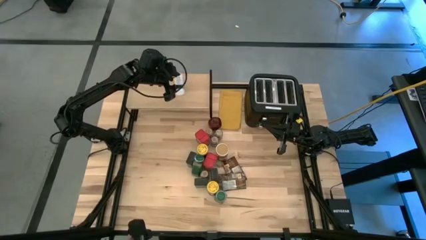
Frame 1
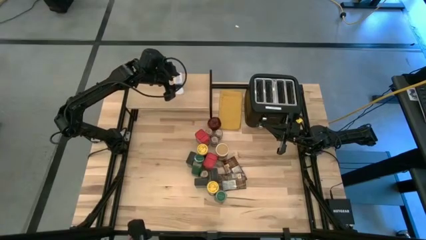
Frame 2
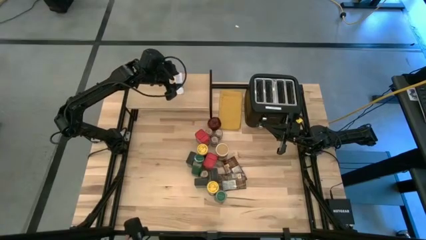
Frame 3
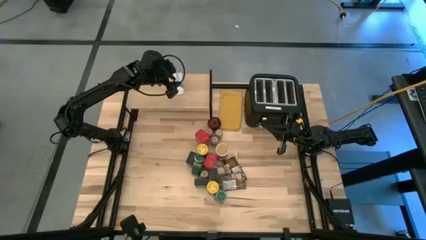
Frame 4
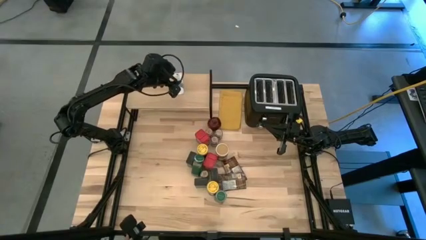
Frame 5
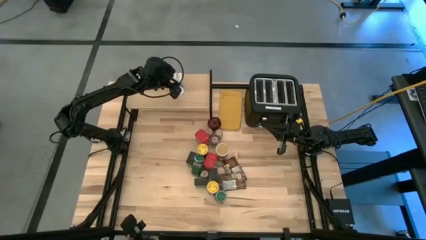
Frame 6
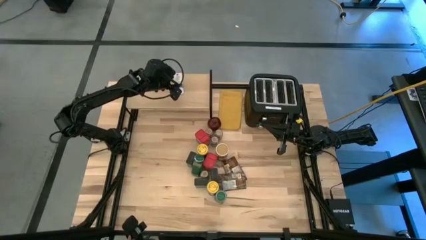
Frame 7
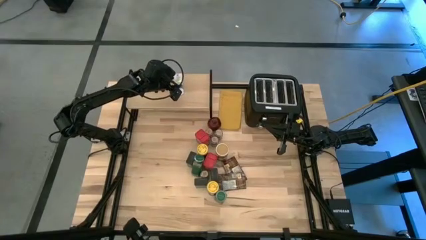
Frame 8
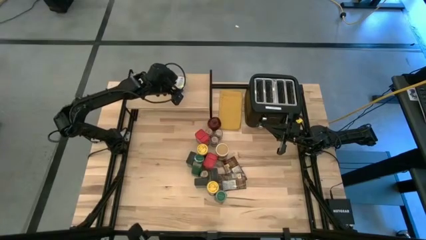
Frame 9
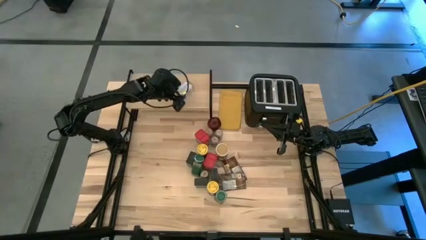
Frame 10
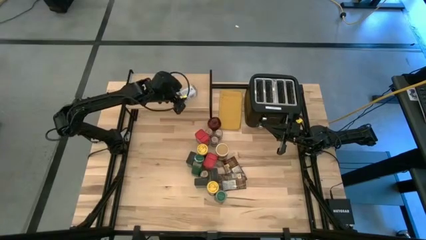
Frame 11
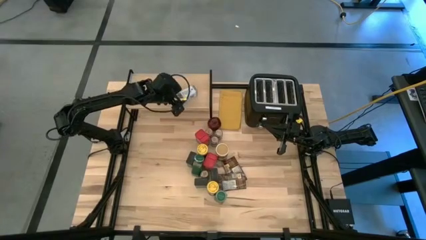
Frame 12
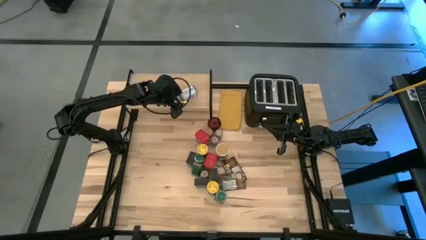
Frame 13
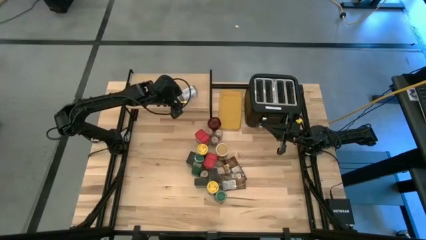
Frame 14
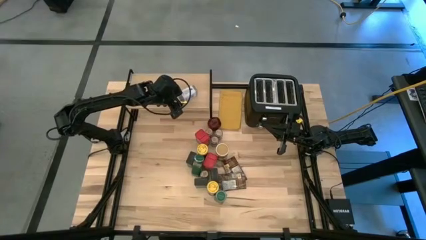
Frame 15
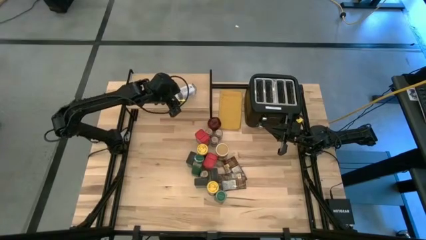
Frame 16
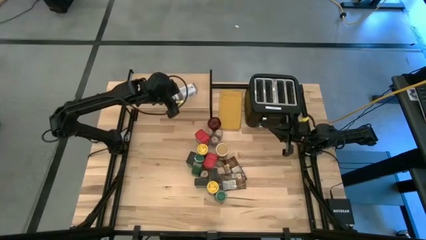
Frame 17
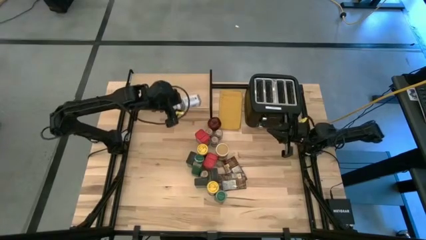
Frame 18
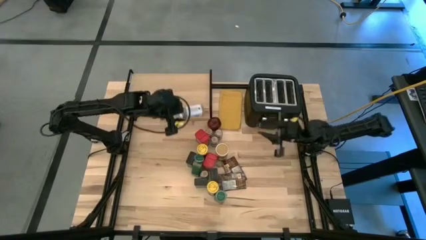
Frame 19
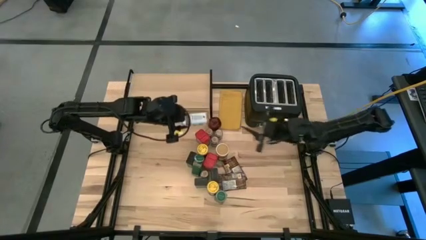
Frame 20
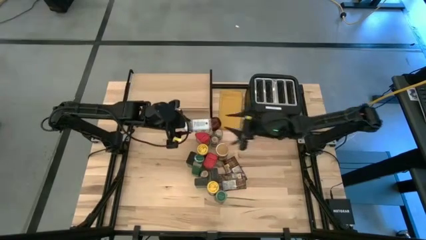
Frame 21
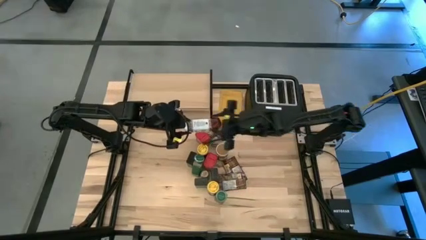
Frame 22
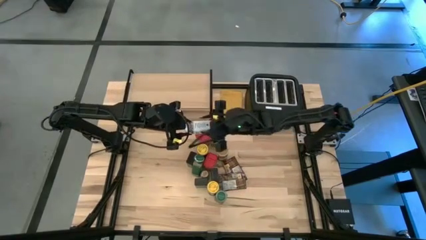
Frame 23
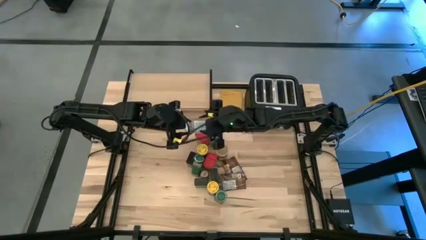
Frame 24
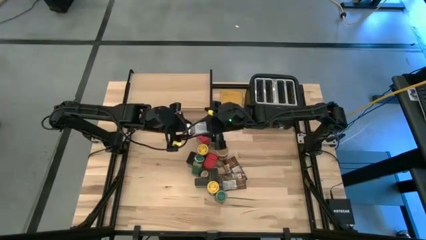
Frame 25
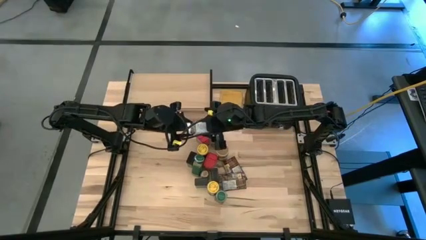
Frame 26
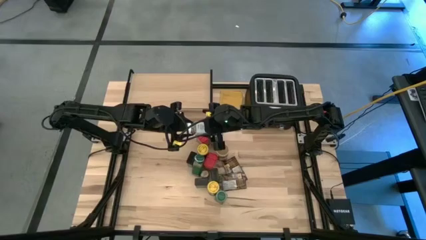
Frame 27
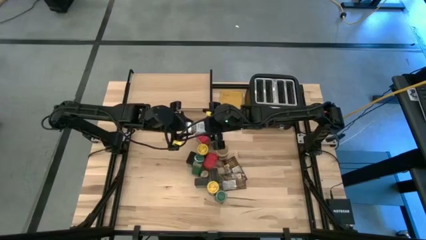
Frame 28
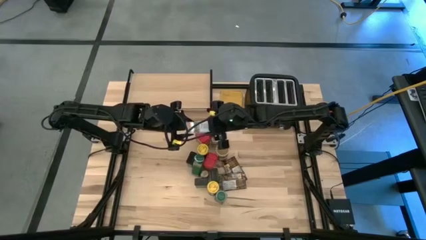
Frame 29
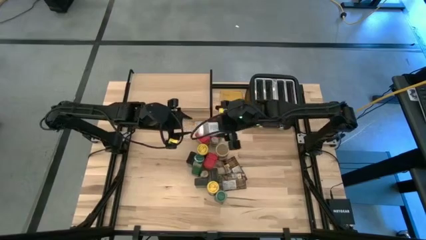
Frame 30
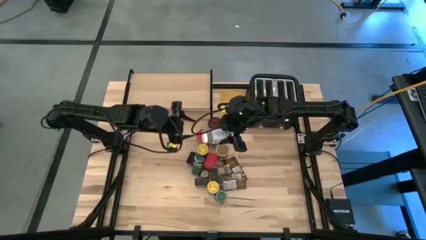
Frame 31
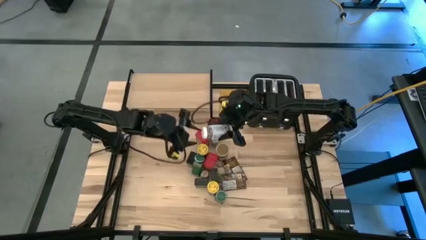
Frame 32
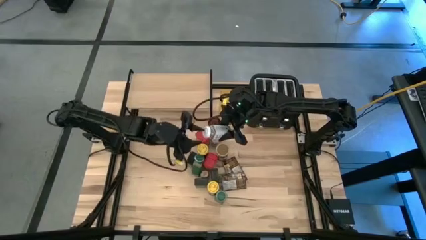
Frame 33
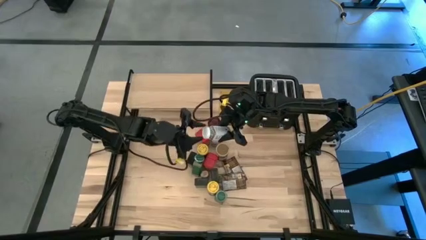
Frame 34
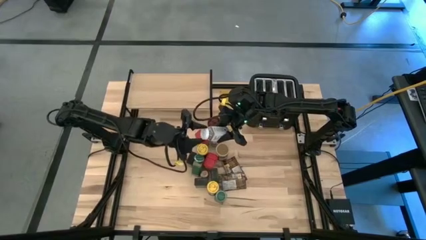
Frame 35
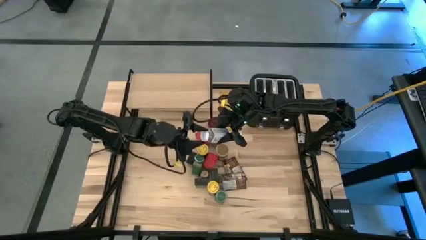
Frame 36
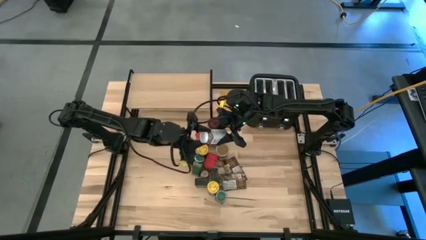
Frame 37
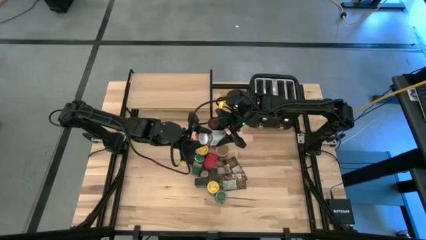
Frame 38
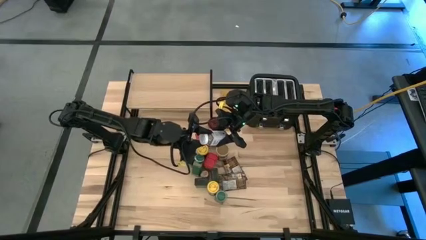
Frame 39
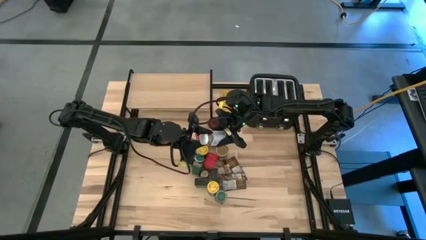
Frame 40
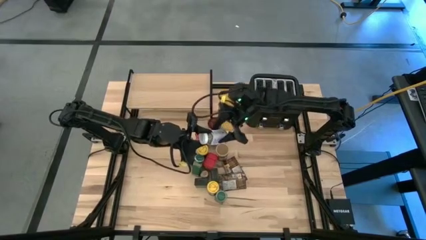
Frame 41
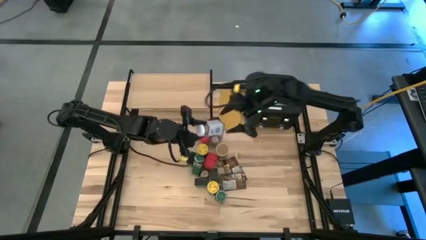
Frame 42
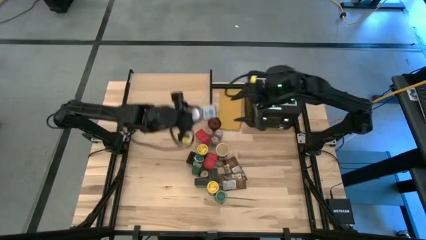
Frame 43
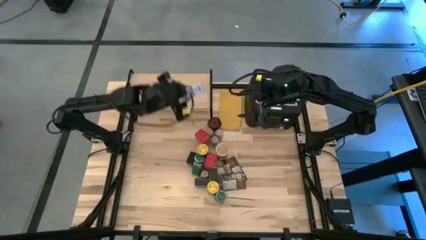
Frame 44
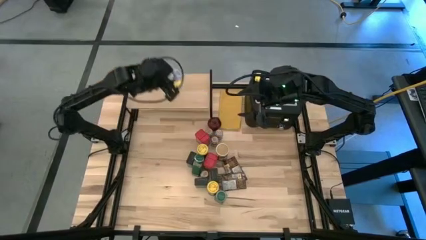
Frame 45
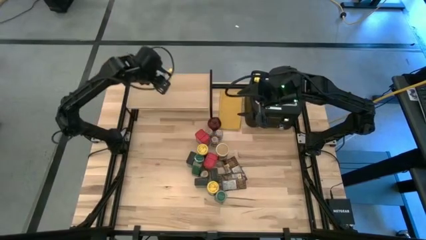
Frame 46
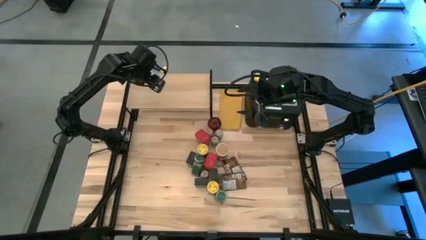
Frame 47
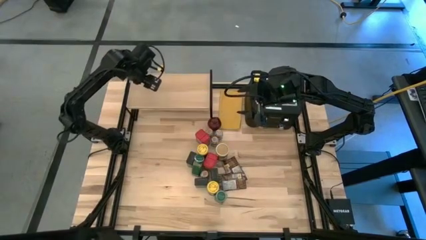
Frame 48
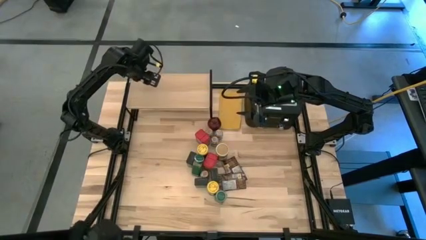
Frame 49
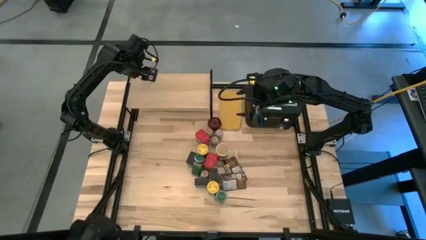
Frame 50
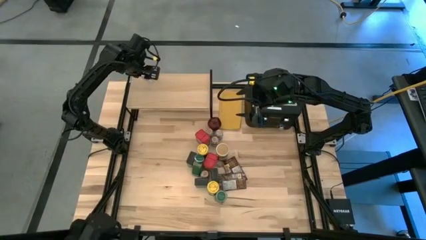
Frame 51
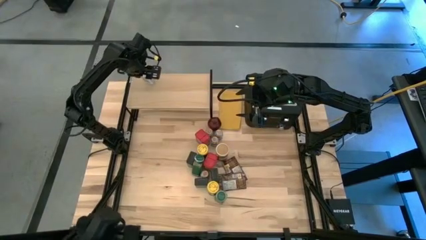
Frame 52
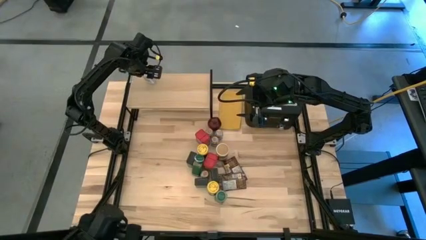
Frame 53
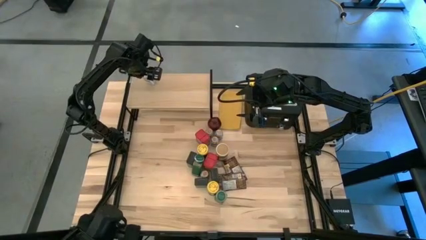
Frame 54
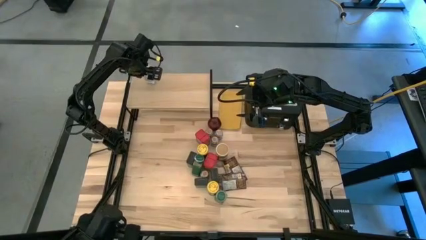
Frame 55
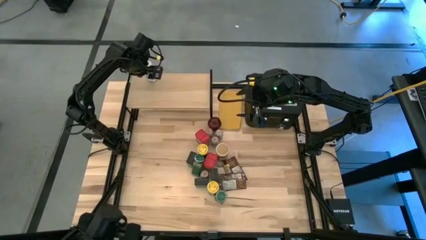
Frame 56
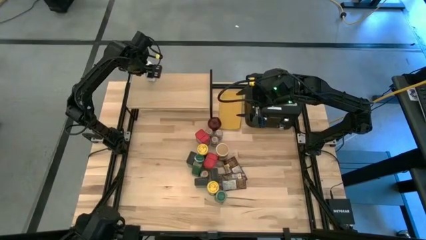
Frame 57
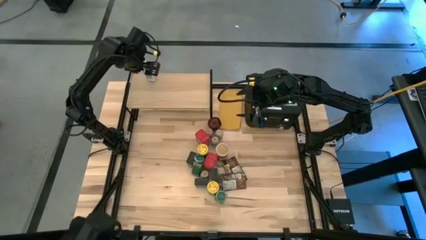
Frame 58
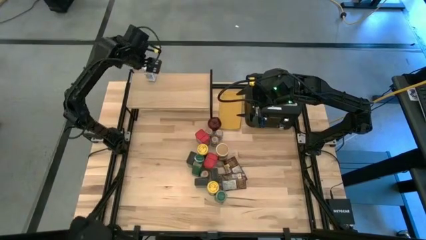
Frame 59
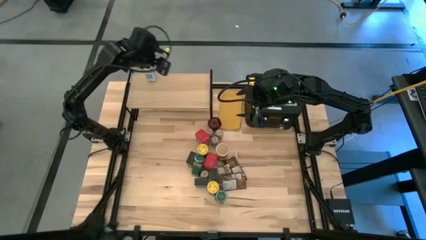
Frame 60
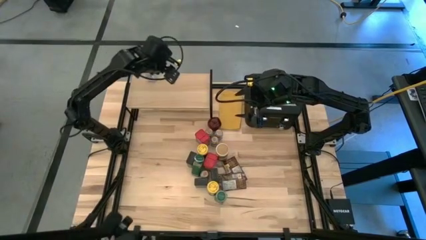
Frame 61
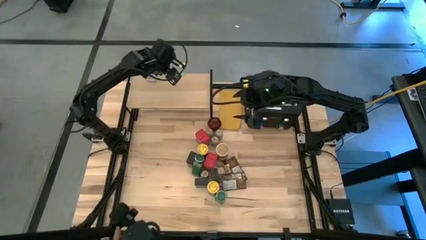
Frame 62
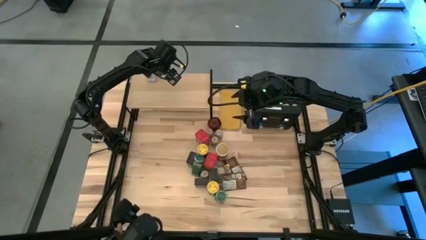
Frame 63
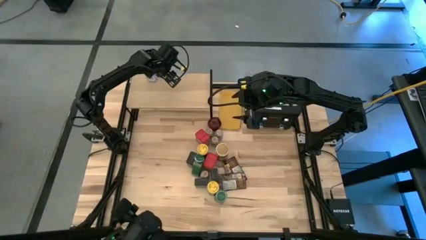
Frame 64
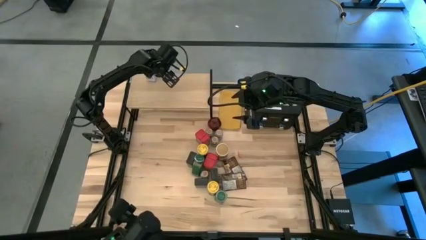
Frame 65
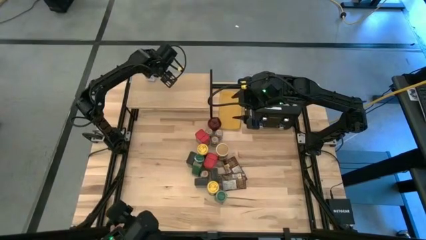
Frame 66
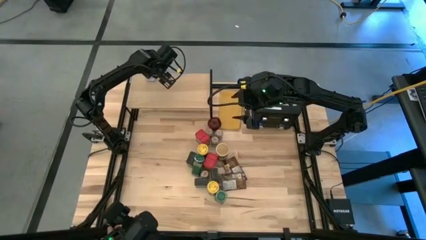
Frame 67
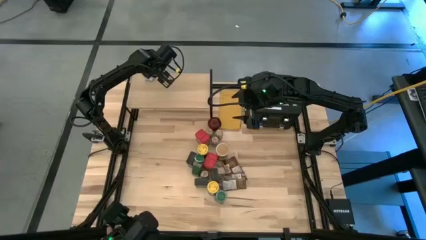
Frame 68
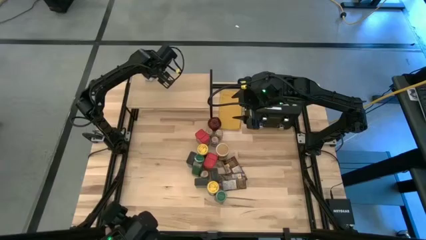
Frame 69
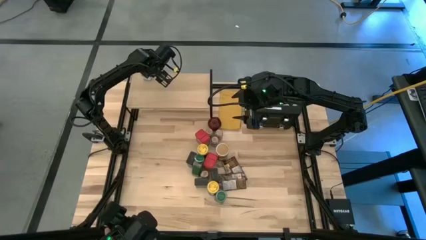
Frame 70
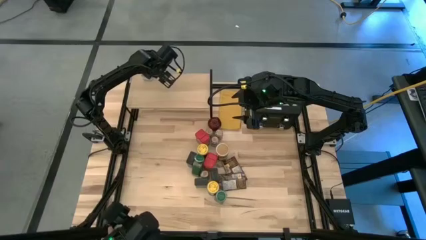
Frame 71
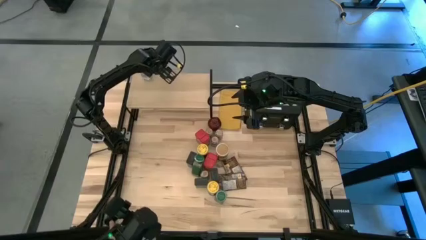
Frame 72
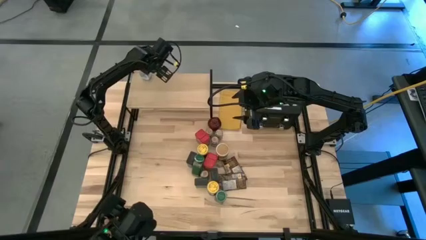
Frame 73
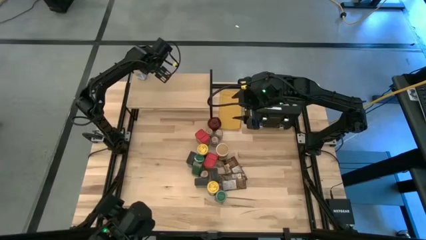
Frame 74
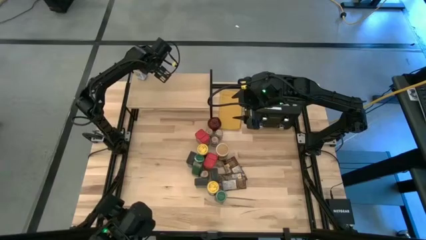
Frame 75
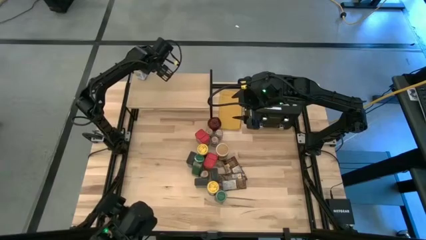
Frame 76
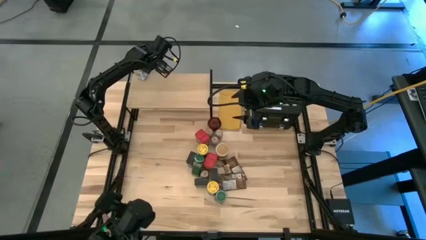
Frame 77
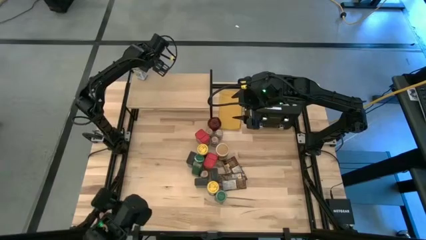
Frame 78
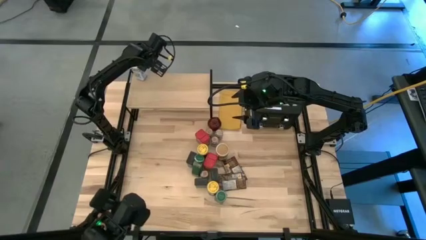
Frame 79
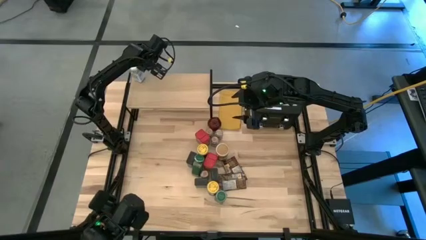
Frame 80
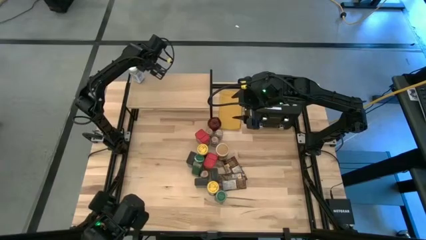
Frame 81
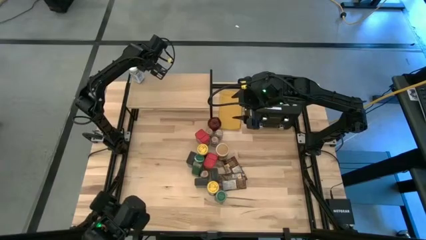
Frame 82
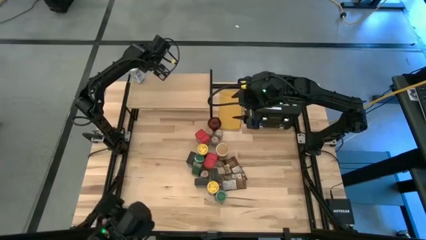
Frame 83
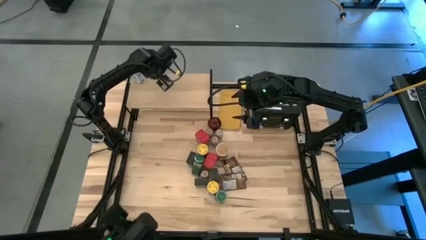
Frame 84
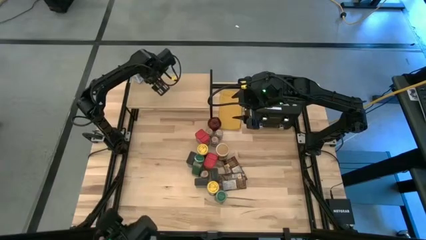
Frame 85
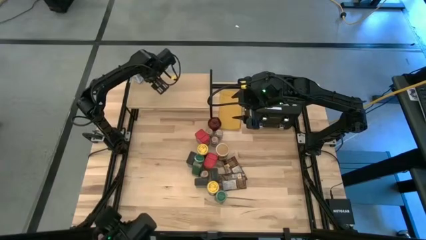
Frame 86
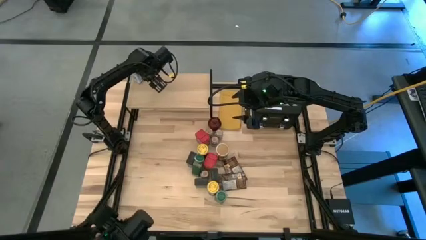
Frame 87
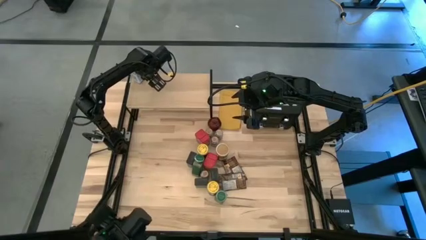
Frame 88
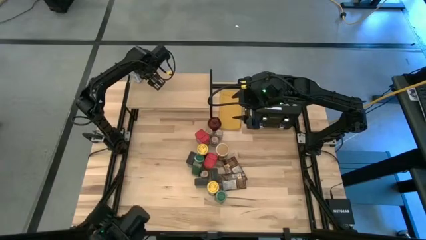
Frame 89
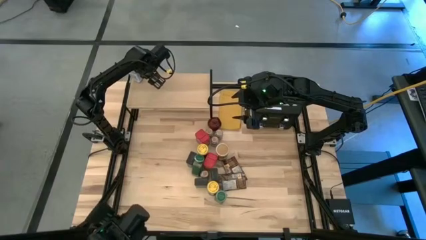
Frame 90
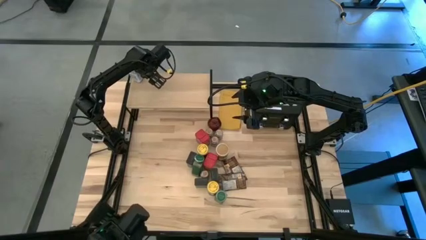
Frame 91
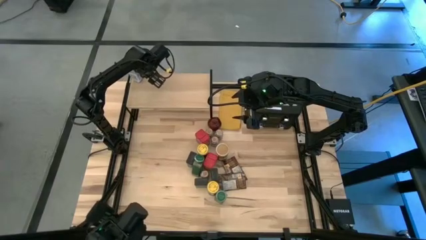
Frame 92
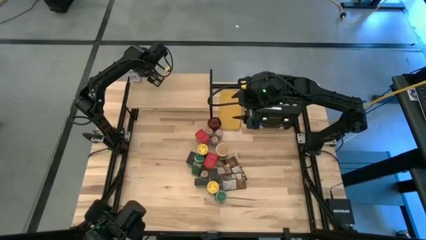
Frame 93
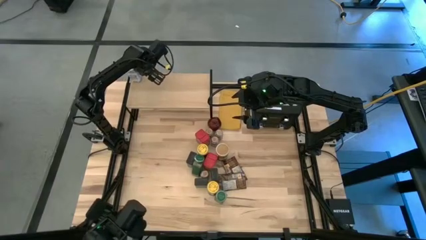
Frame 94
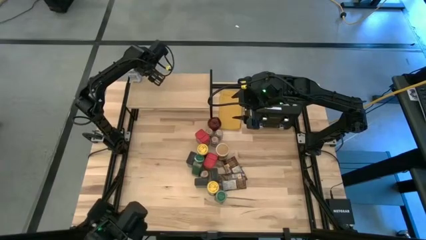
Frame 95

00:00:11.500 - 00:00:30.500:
Task: Shelf spices
Put the white seasoning bottle on the shelf
